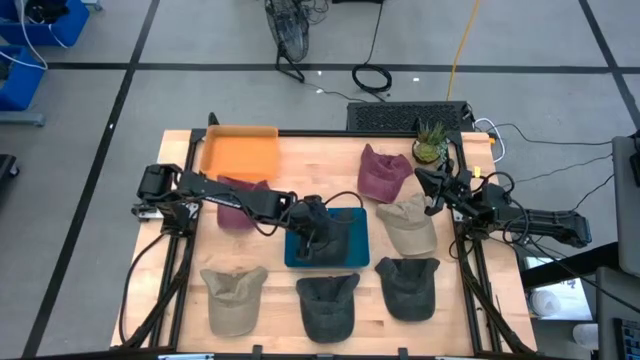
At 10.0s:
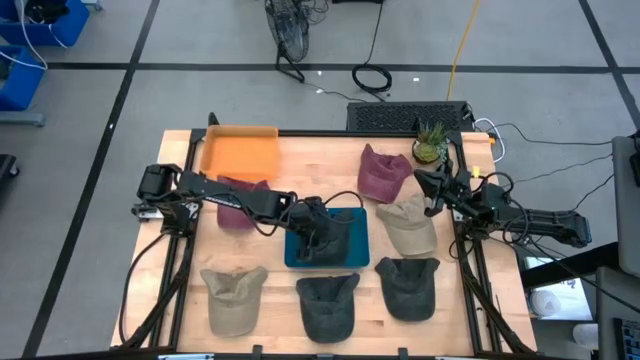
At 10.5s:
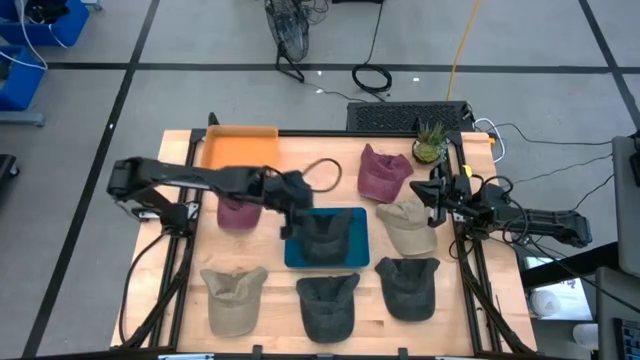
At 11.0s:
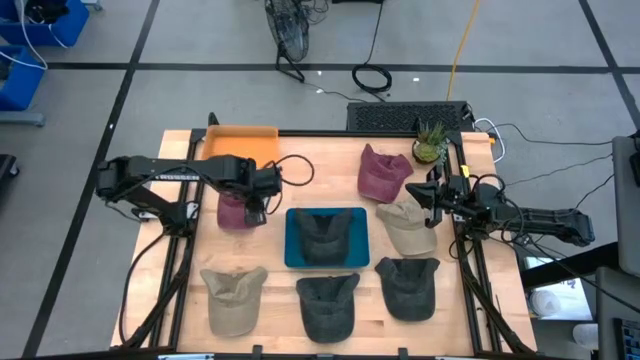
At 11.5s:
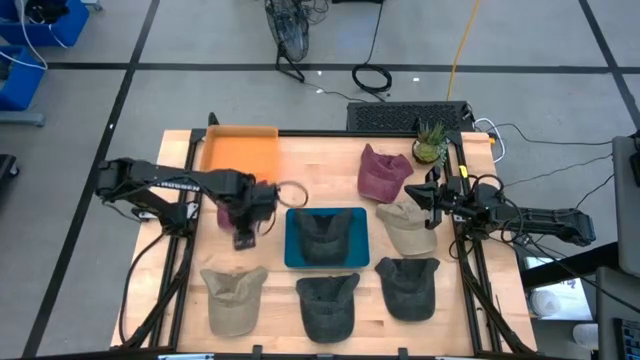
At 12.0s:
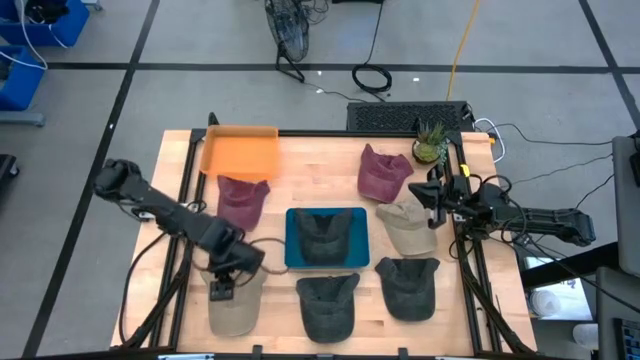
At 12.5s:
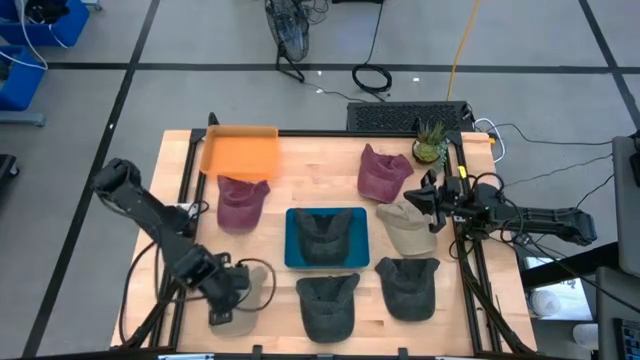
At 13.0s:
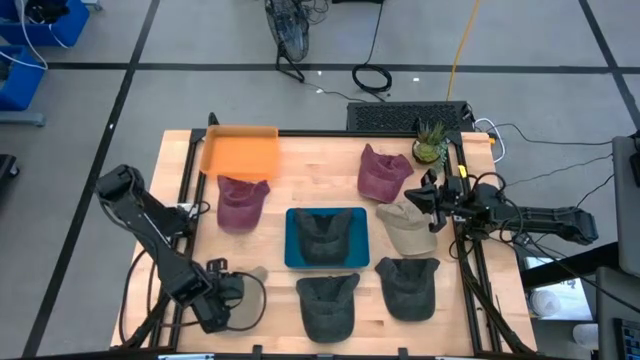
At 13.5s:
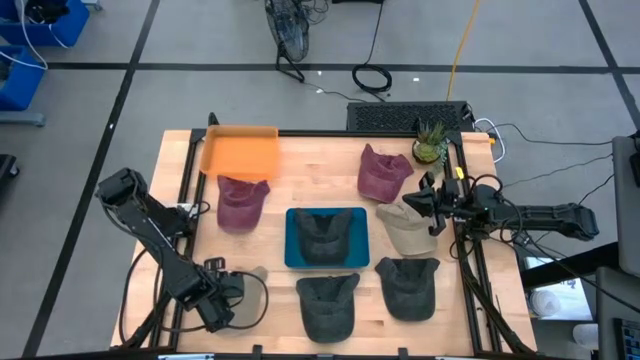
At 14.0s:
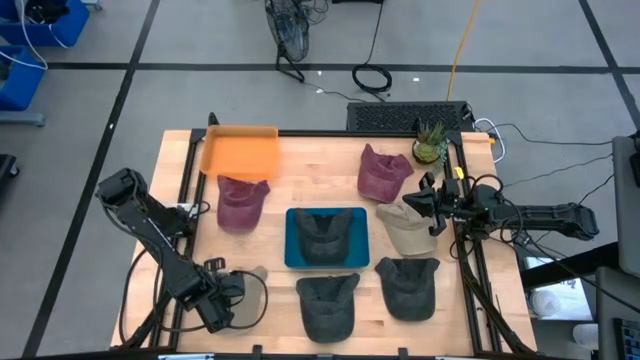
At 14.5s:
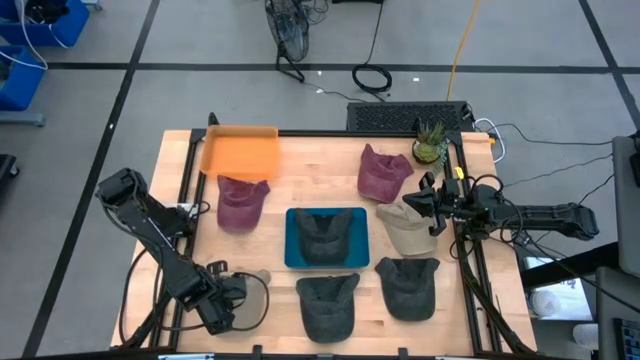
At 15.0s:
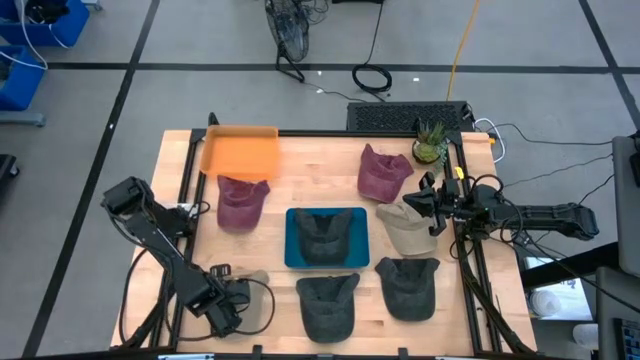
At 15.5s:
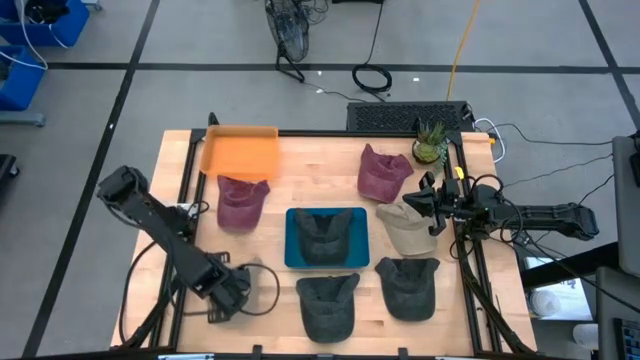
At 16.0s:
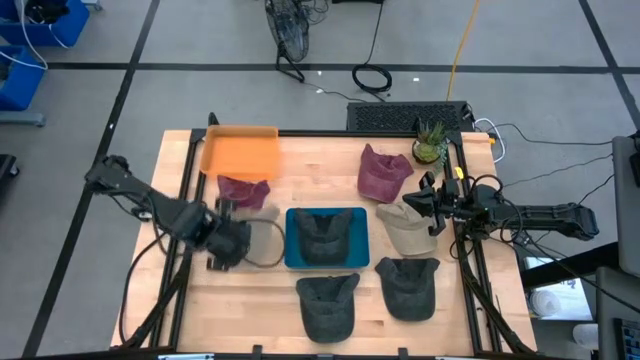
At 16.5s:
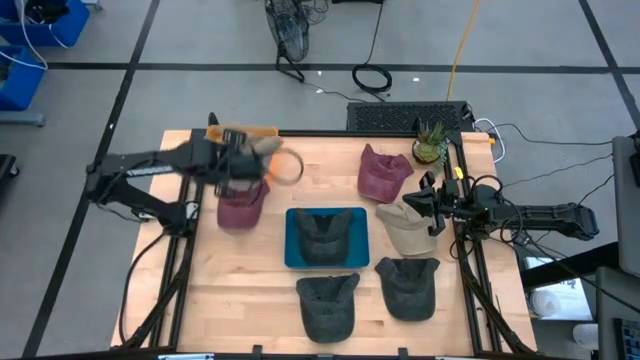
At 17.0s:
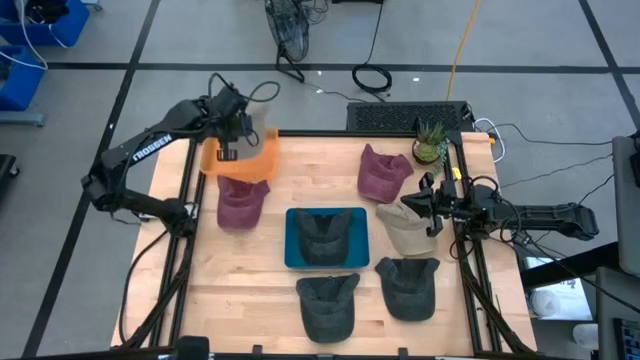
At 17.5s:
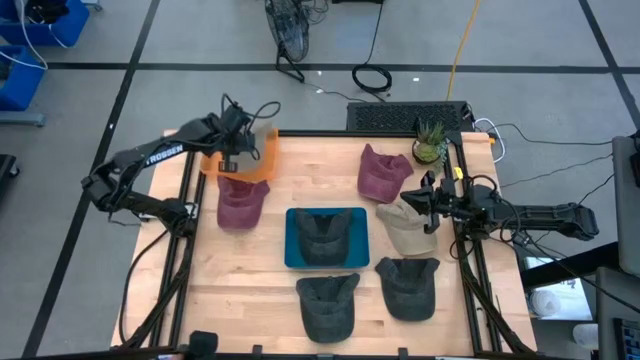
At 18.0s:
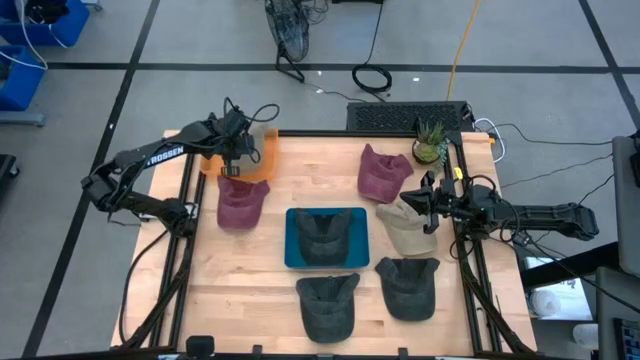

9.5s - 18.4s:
Task: Pick & Place hat
Put the left brown cap into the orange bin

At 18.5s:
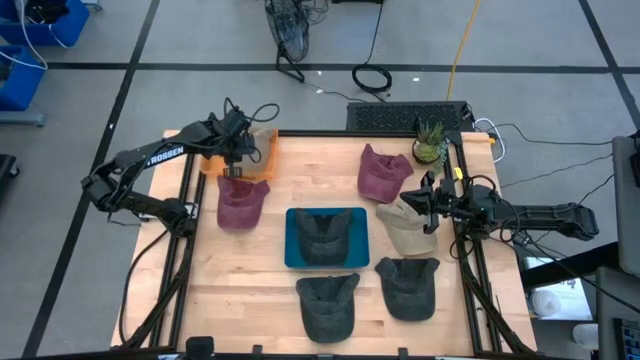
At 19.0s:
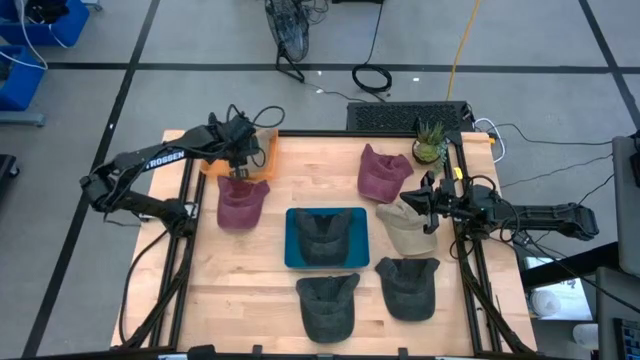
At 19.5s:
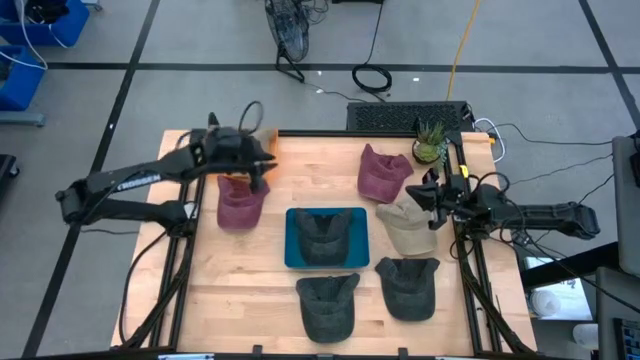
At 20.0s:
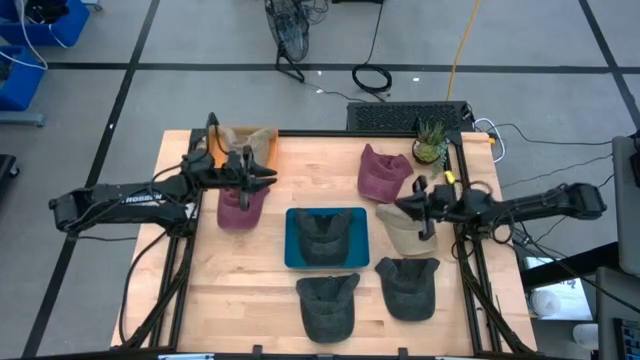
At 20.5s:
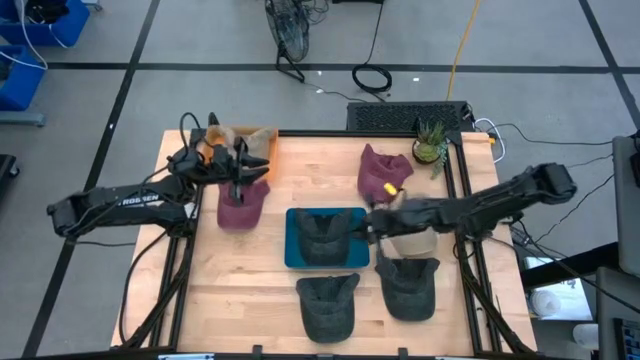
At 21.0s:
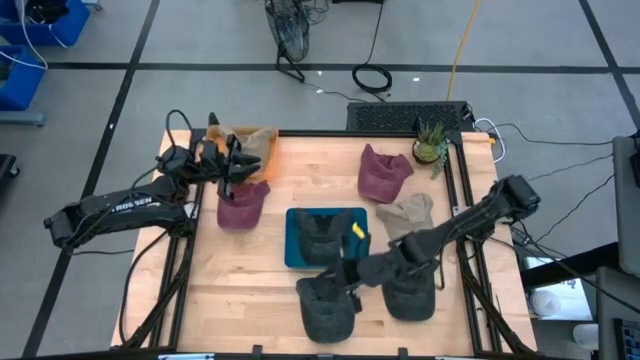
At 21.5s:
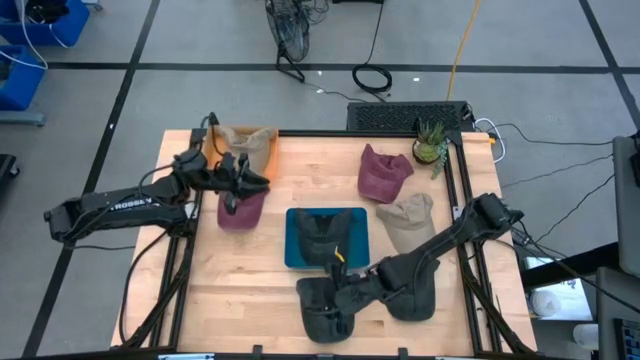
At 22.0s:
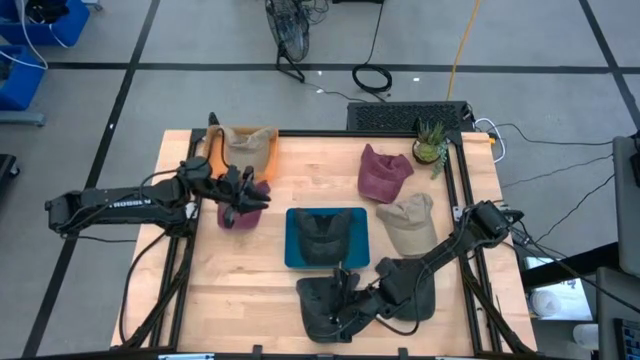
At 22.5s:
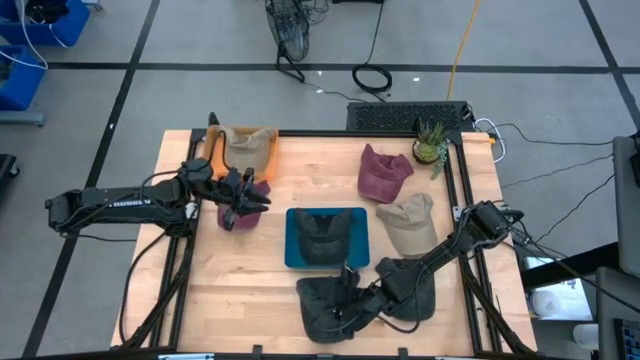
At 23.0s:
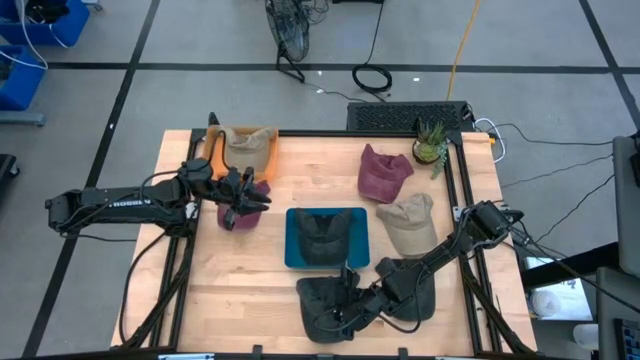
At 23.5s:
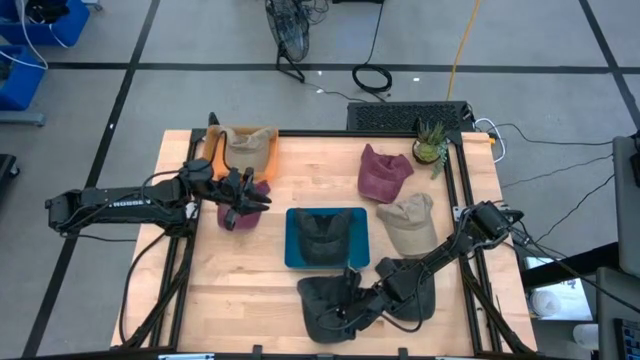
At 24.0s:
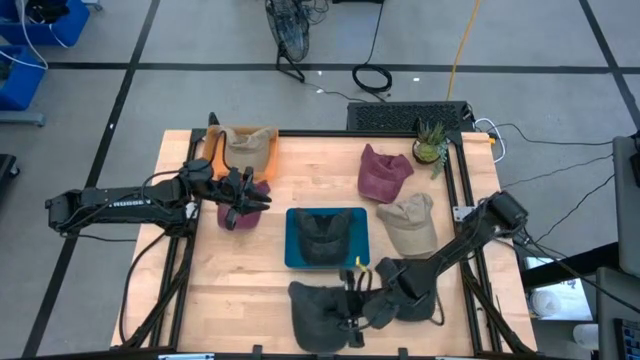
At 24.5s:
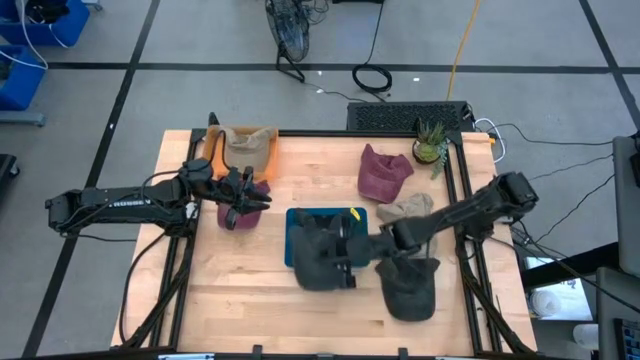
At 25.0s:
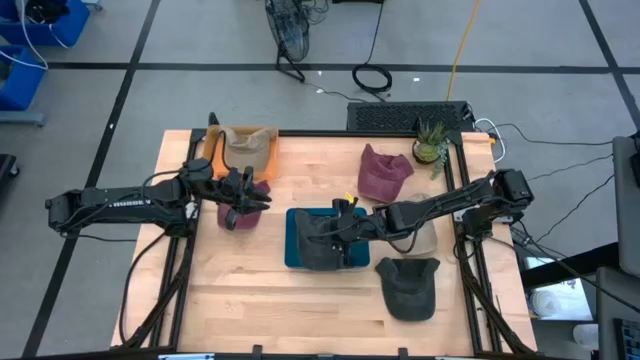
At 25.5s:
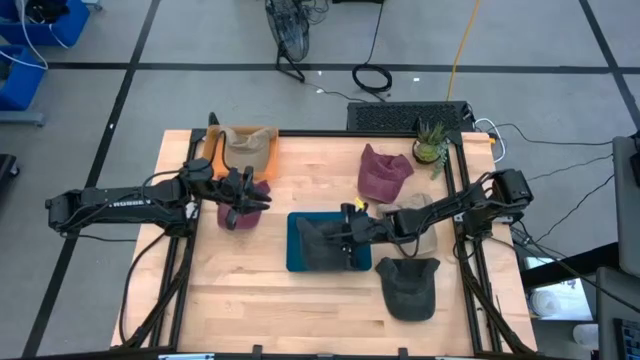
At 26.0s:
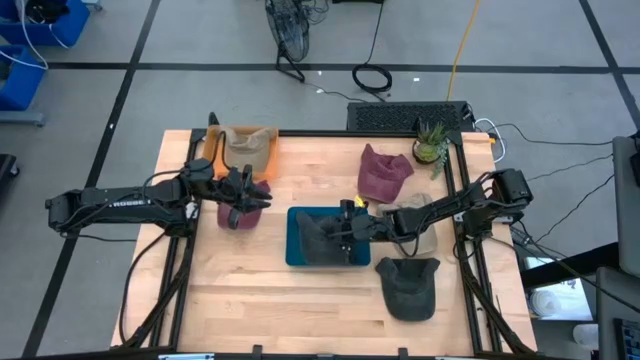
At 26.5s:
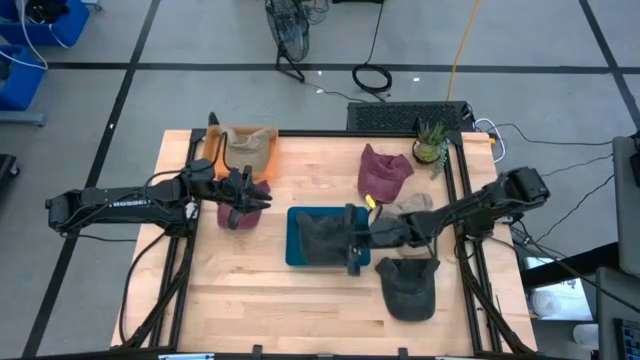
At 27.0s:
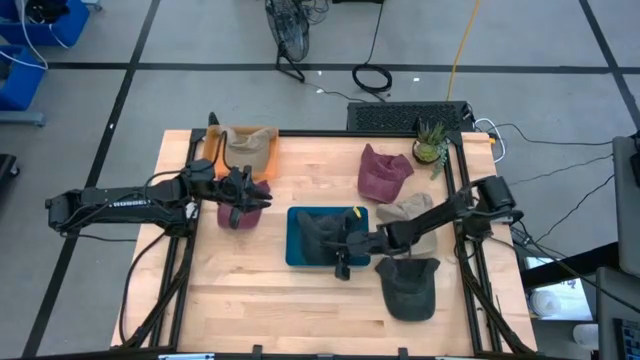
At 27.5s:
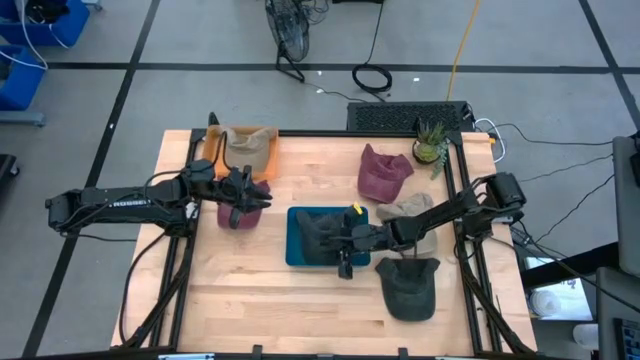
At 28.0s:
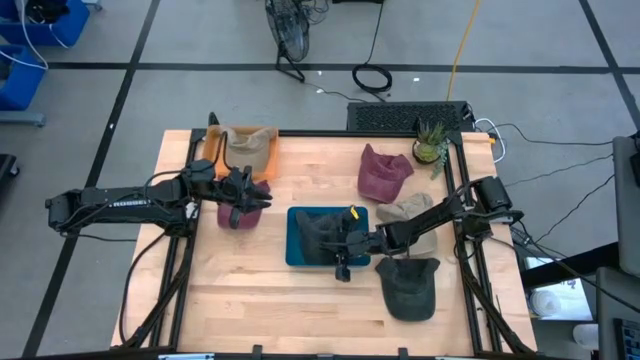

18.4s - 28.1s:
Put the left black cap into the blue bin

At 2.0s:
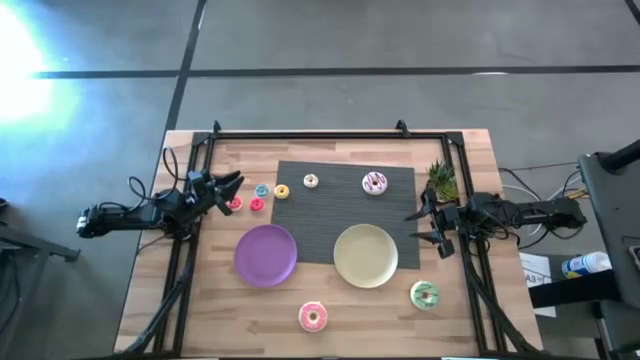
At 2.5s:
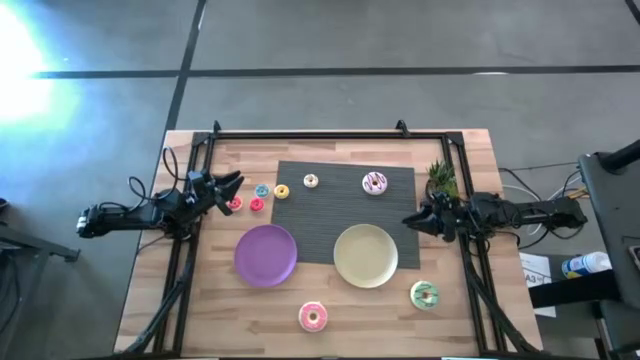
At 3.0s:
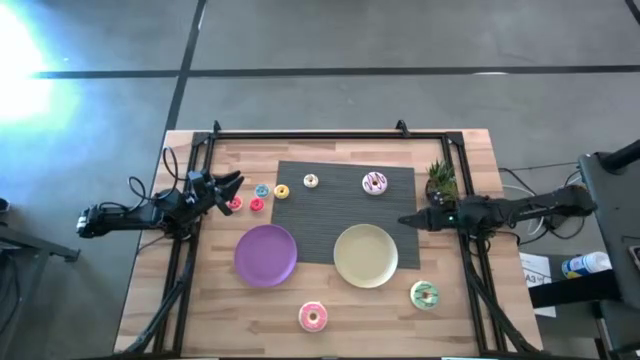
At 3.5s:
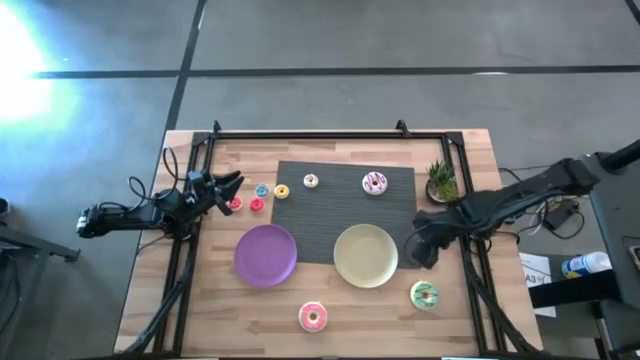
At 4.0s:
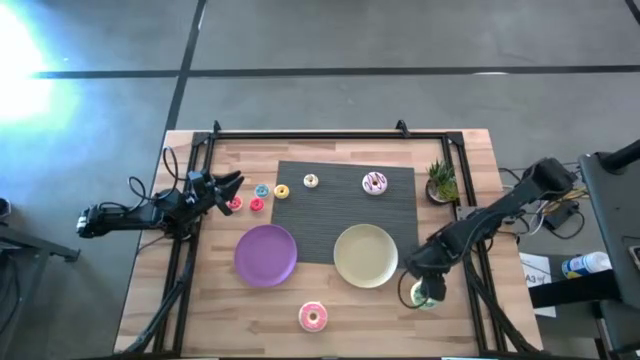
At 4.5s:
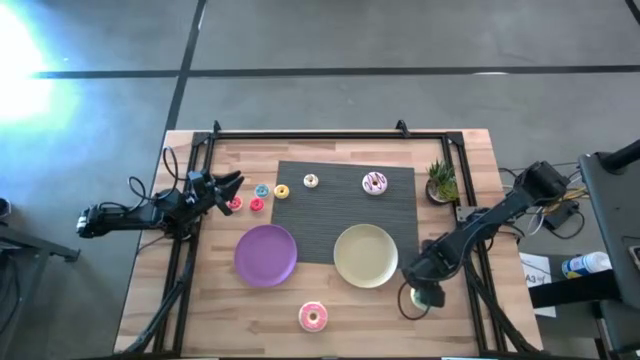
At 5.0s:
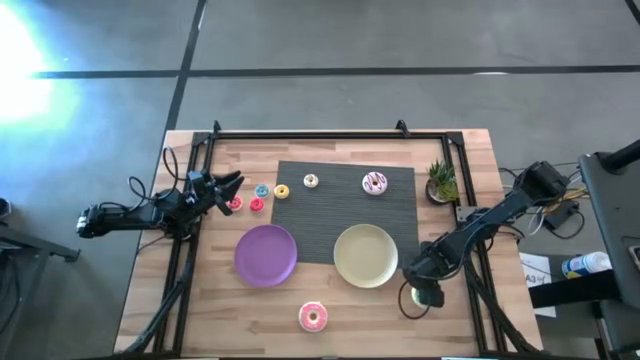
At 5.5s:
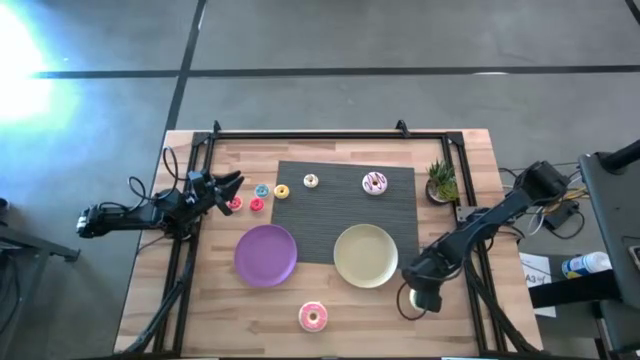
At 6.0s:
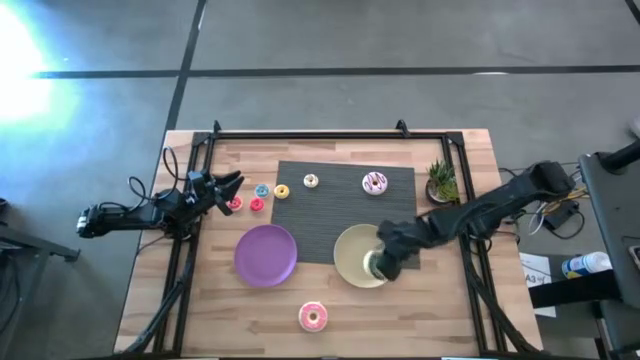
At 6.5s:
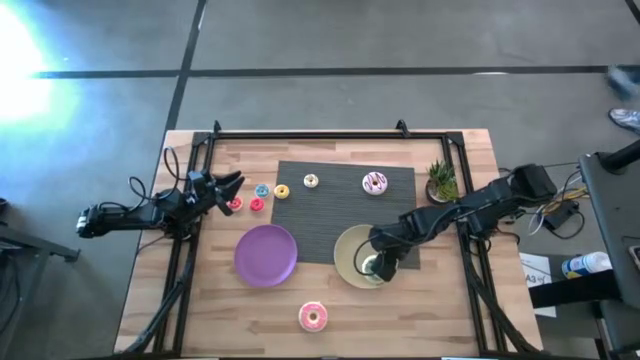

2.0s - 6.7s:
Task: Pick & Place donuts
Put the large blue donut on the white plate
